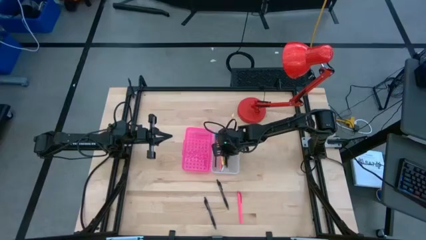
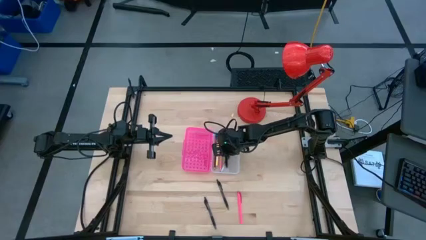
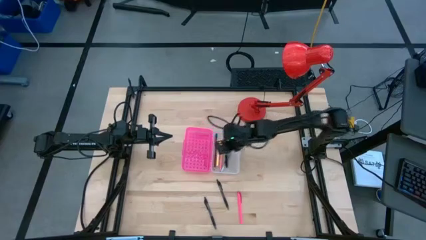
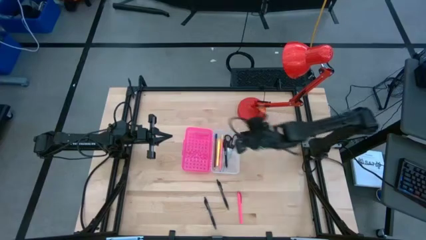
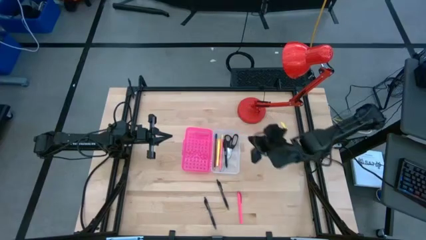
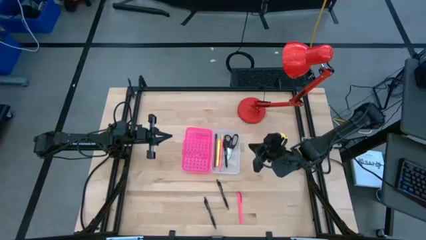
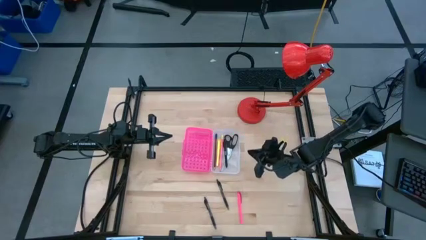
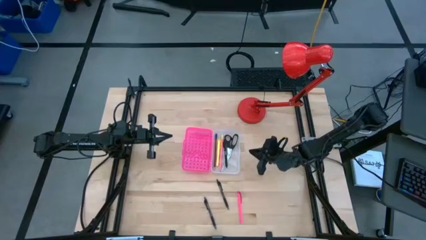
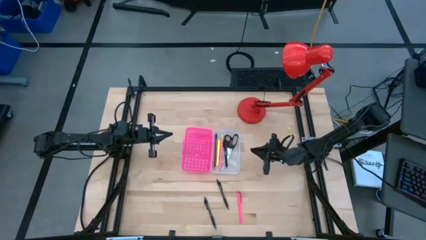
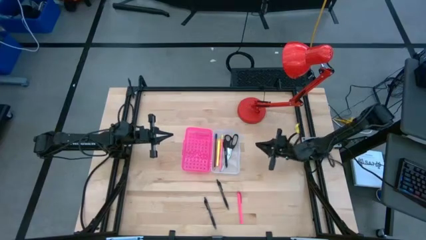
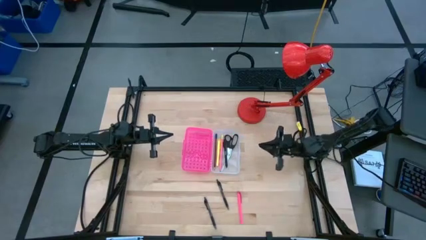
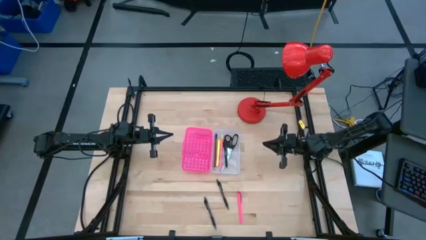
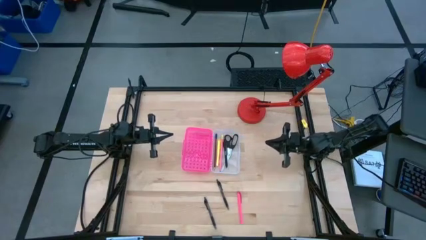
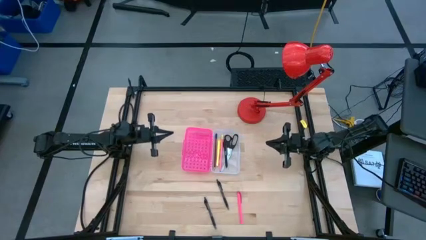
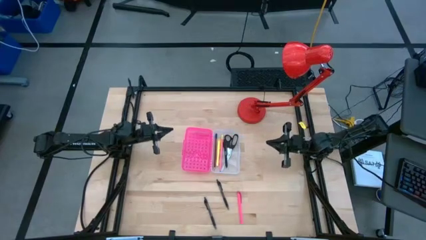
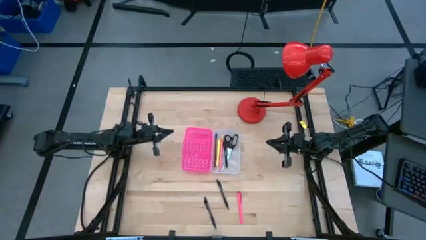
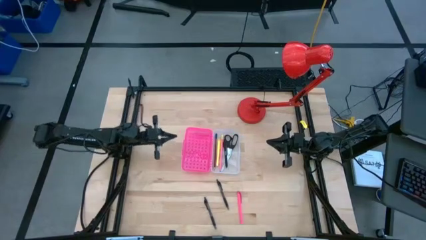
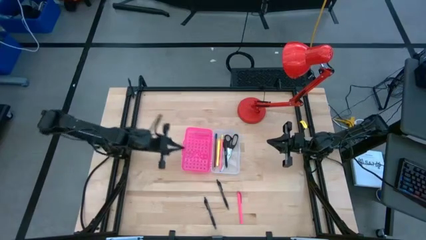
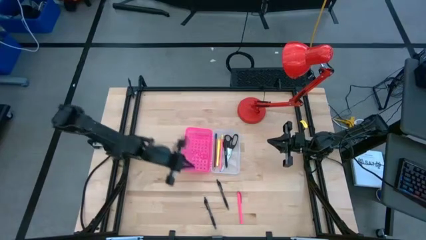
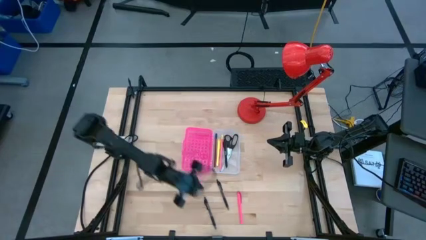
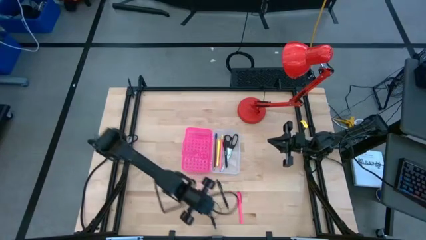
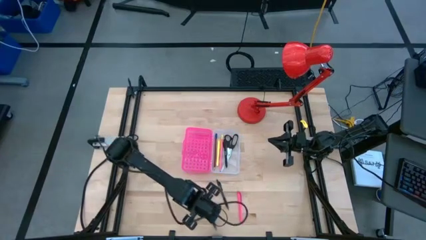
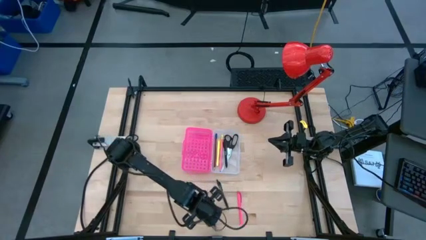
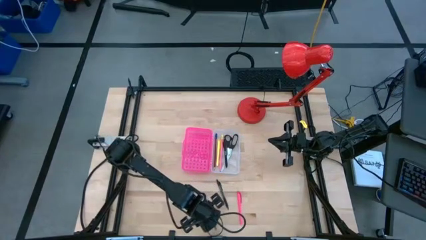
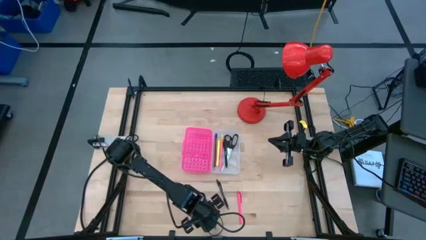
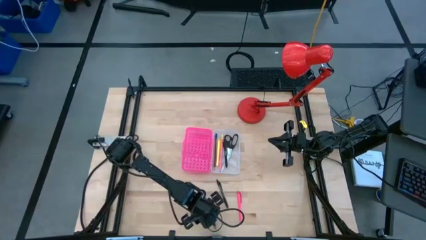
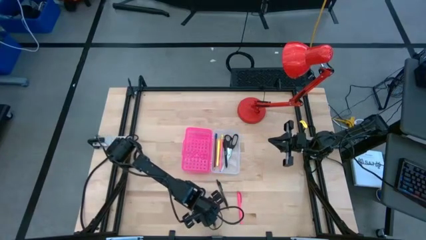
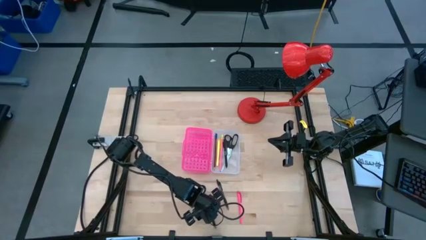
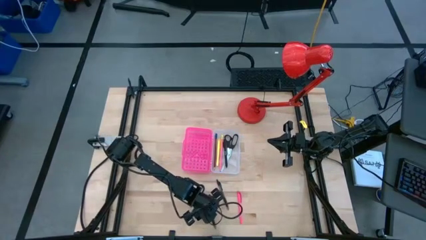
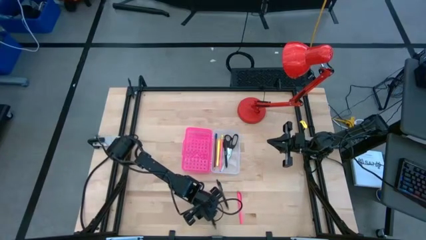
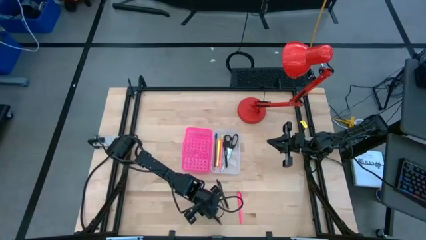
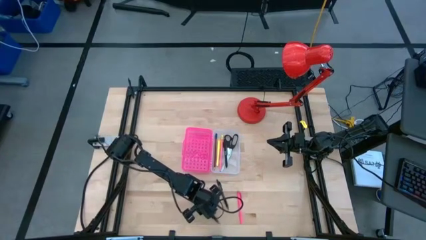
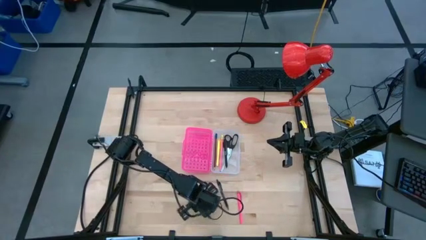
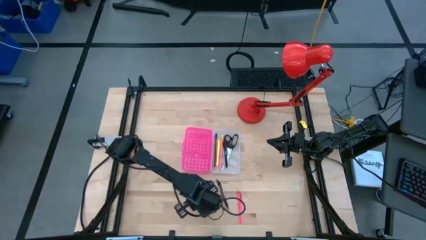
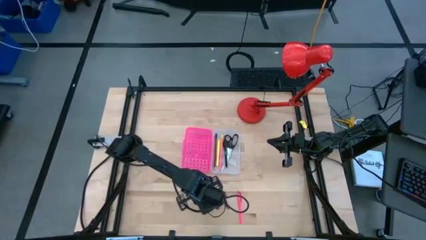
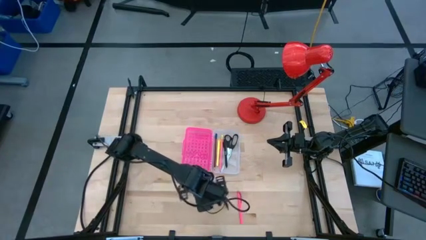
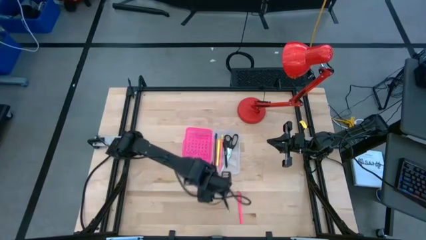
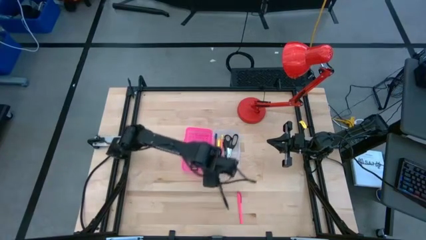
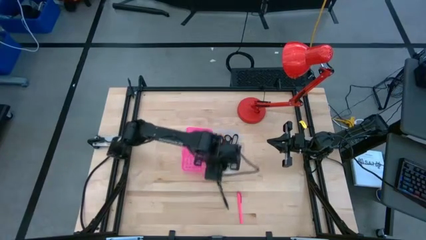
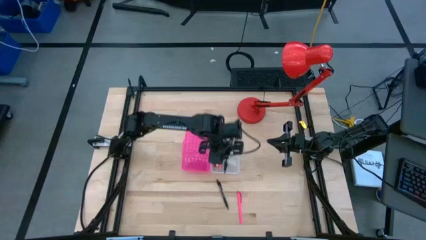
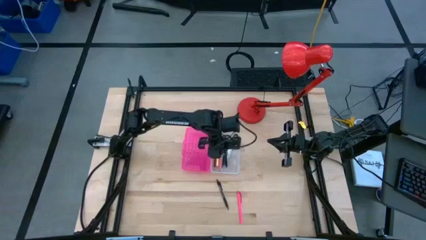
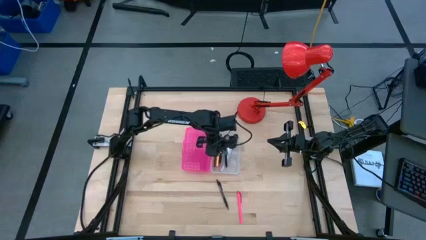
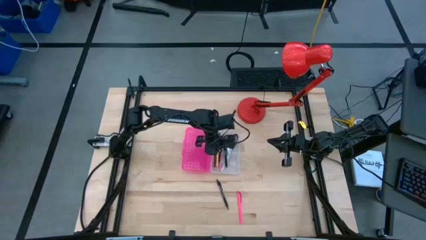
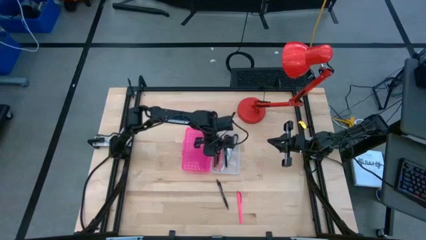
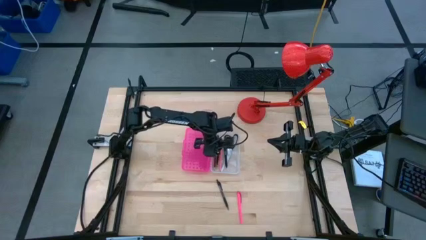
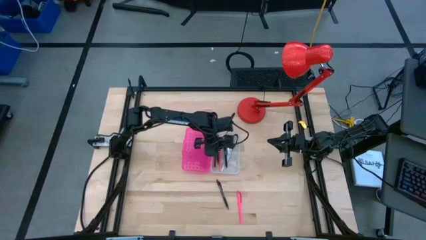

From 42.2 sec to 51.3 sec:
Task: Pick & place school supplies into a supply box
Put the left black pen into the pink supply box

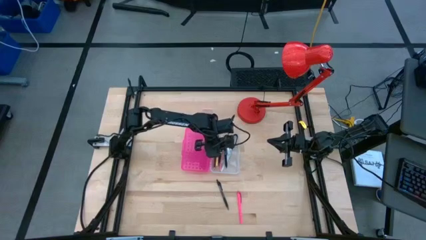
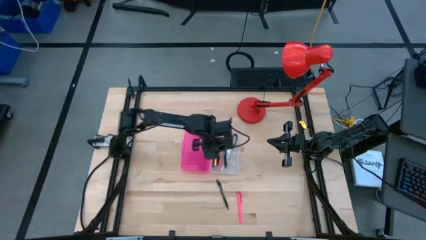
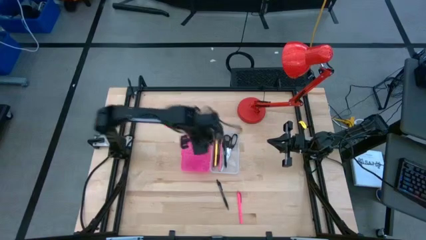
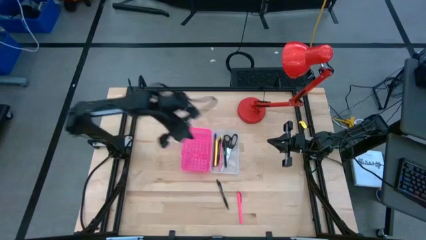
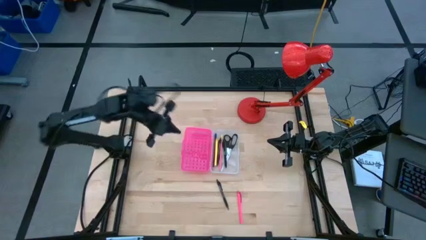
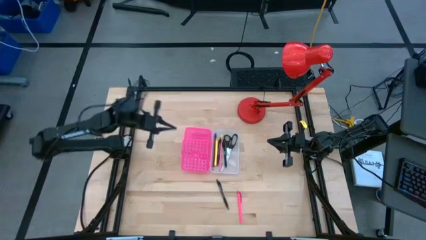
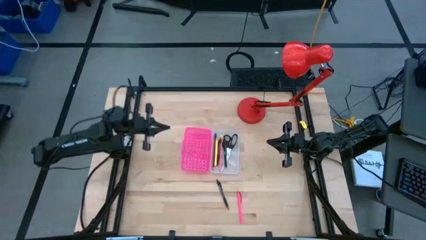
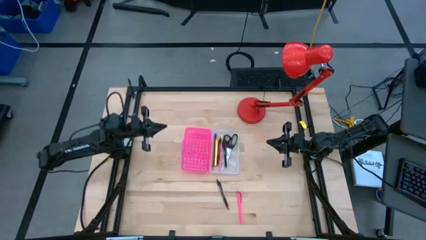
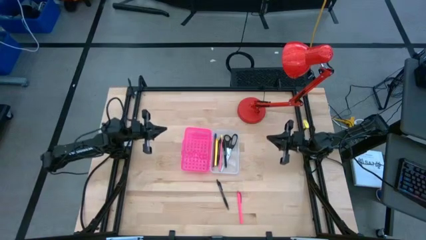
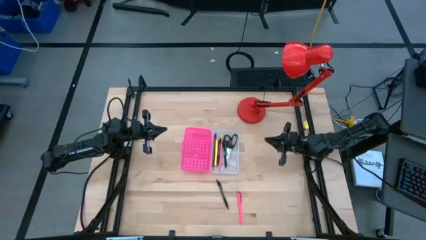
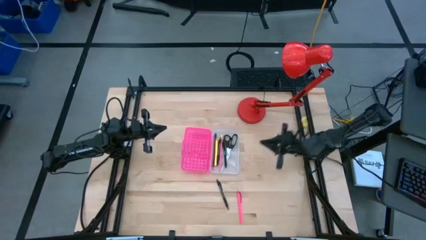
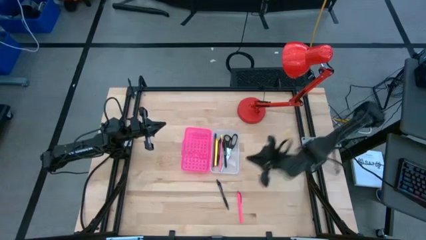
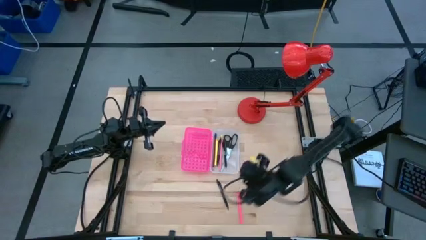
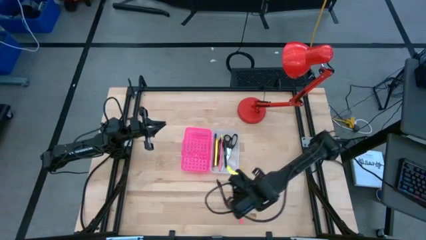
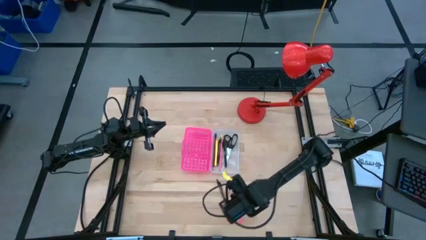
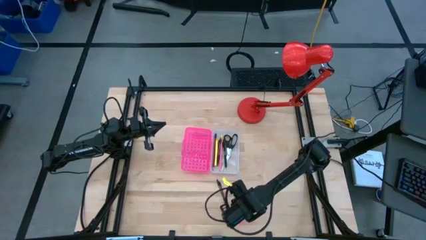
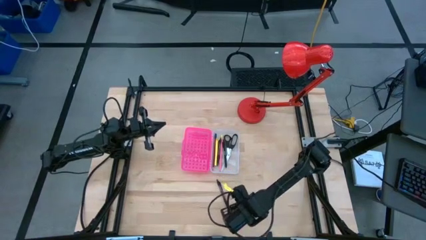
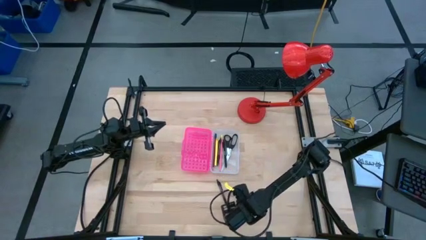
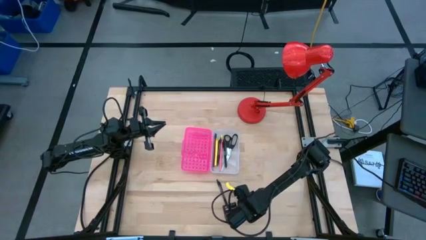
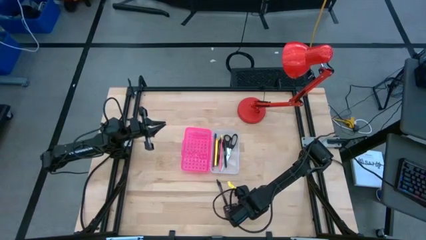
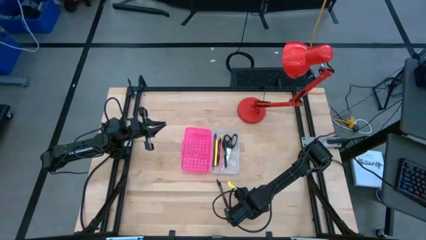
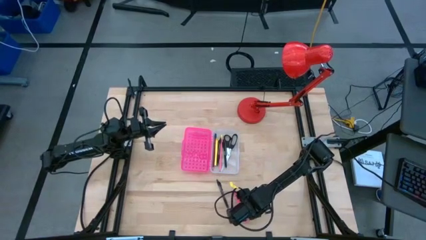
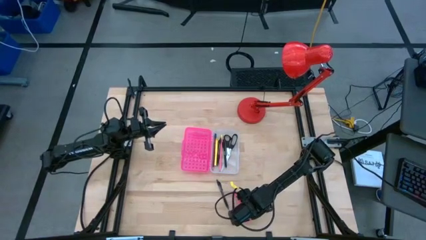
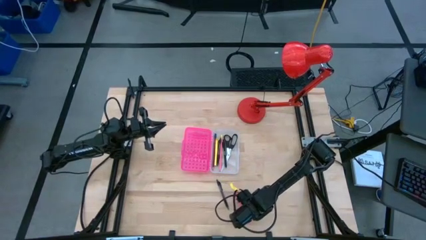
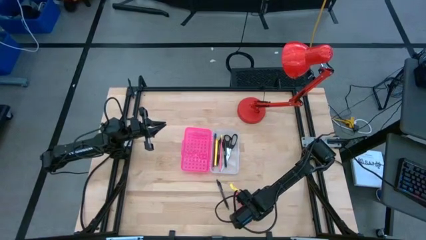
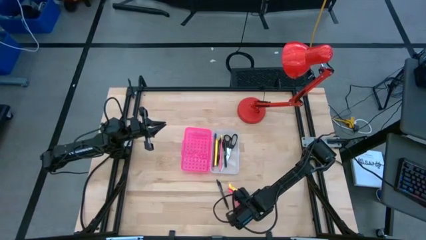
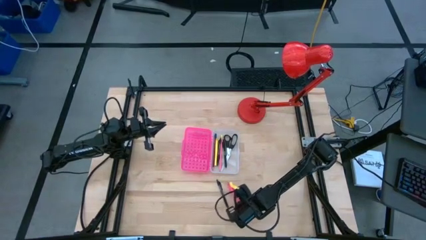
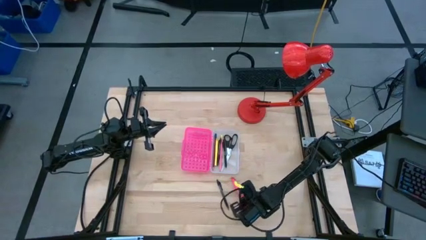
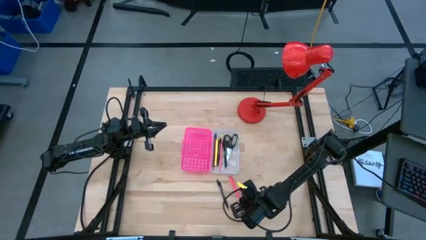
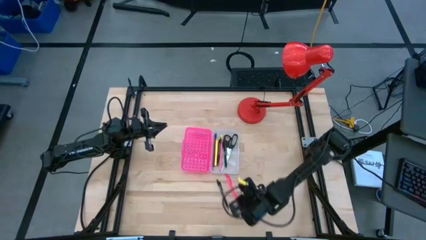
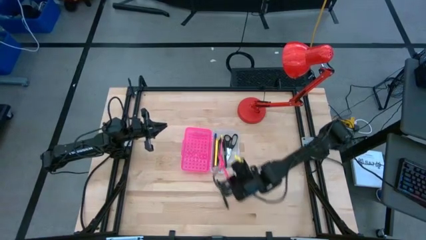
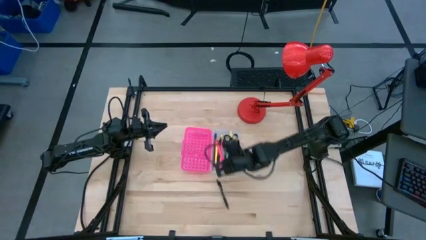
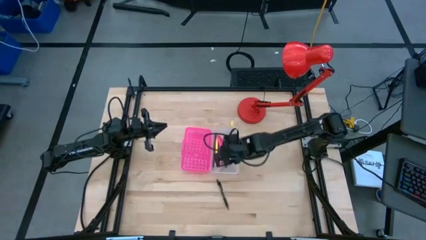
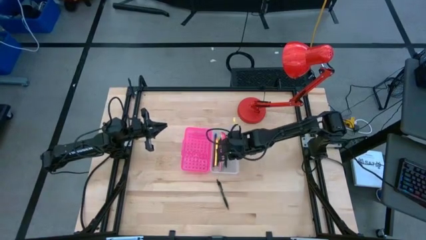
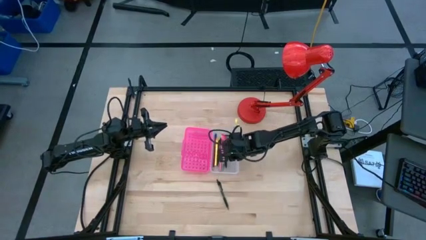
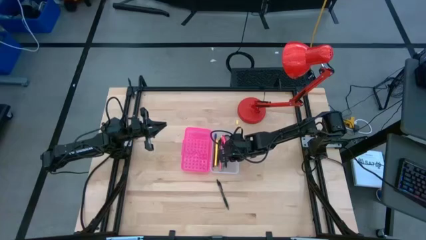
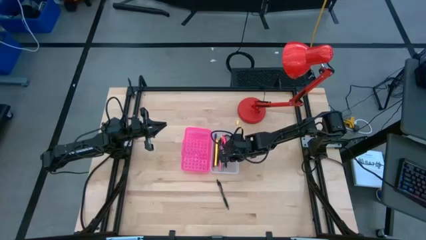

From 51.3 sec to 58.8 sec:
Put the pink pen into the pink supply box
